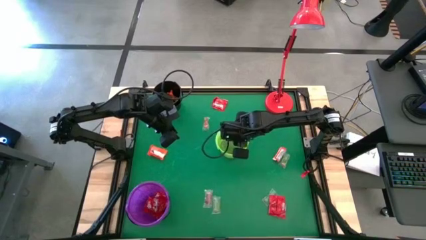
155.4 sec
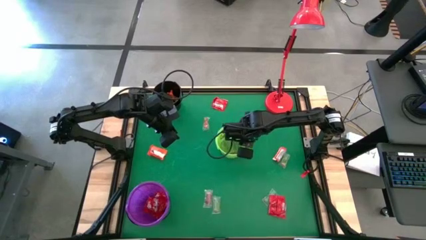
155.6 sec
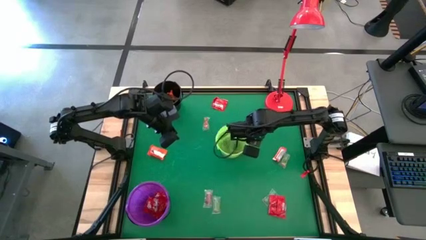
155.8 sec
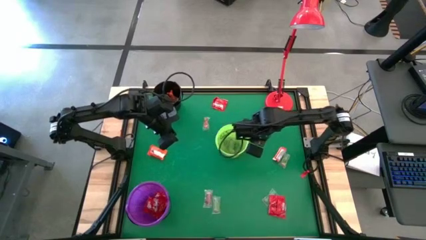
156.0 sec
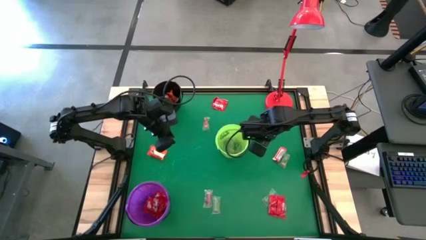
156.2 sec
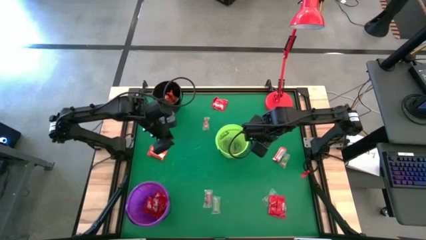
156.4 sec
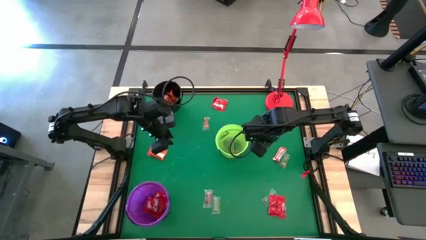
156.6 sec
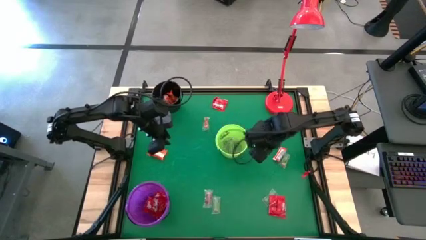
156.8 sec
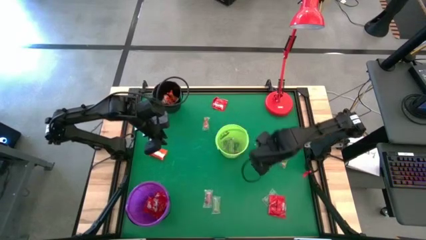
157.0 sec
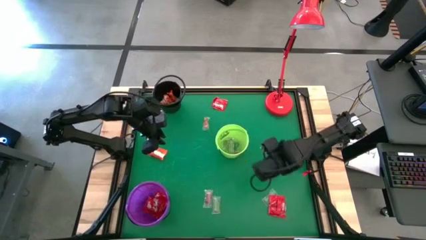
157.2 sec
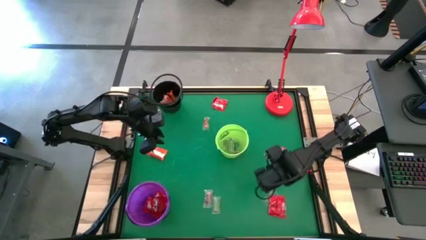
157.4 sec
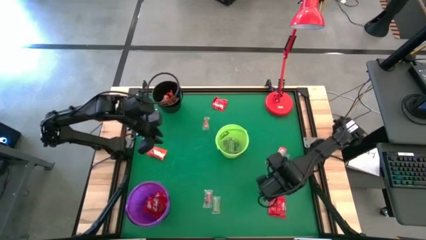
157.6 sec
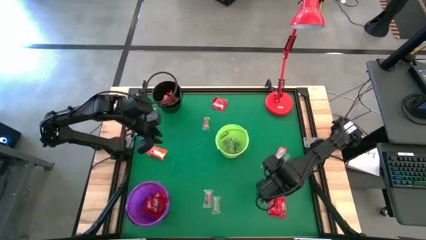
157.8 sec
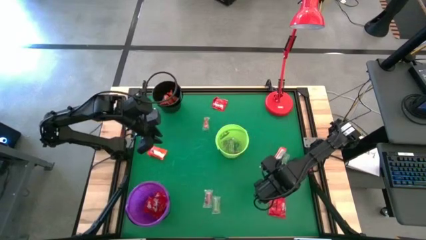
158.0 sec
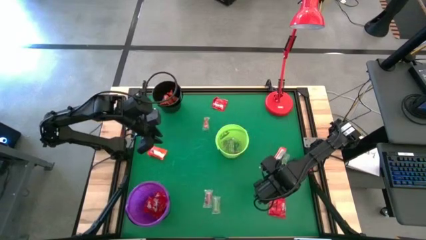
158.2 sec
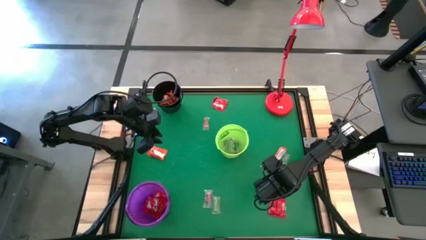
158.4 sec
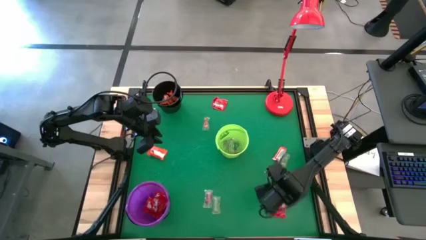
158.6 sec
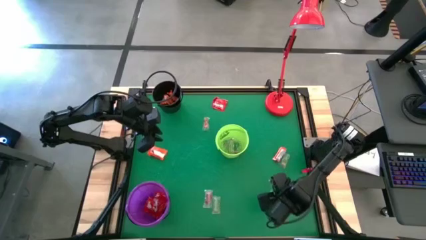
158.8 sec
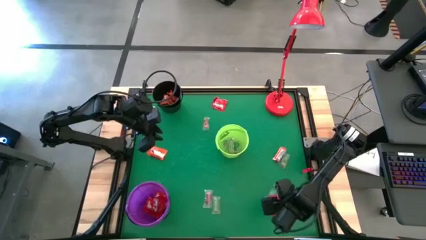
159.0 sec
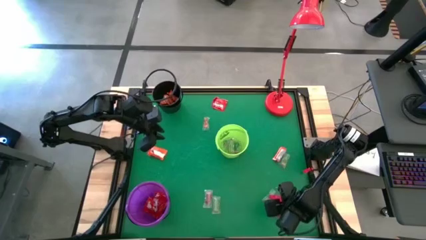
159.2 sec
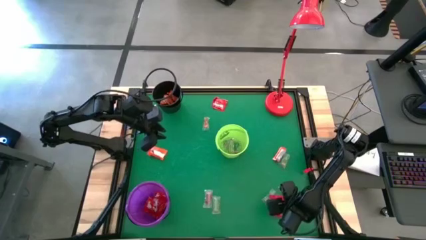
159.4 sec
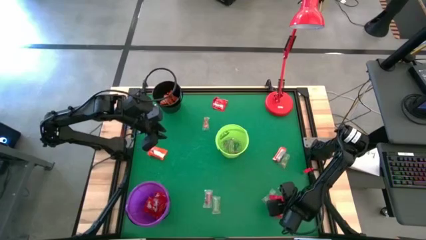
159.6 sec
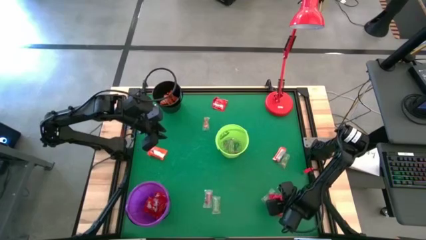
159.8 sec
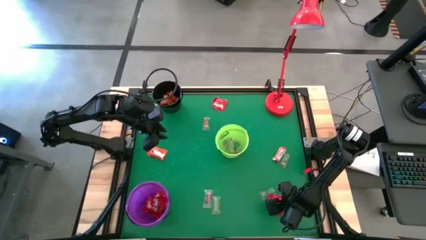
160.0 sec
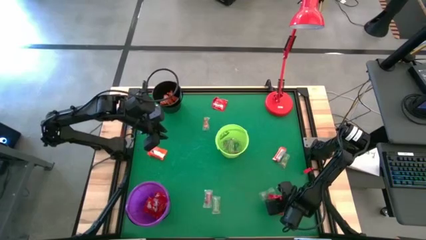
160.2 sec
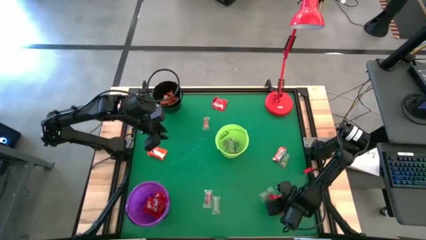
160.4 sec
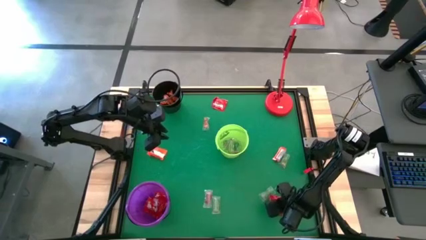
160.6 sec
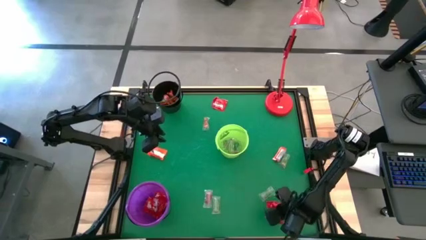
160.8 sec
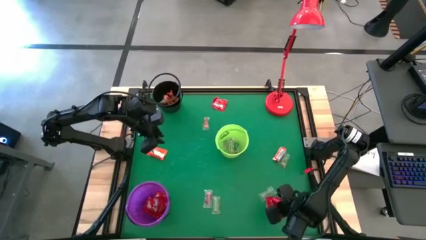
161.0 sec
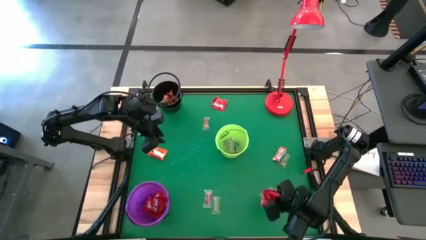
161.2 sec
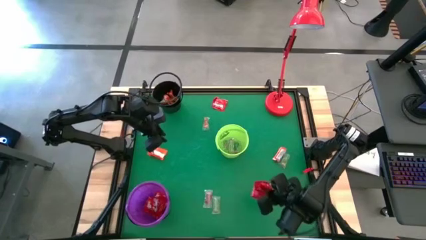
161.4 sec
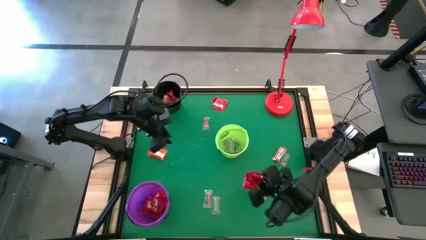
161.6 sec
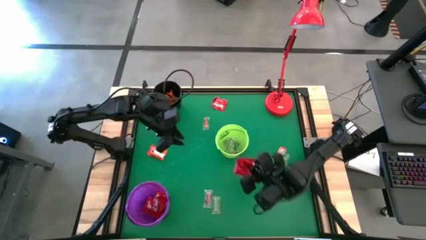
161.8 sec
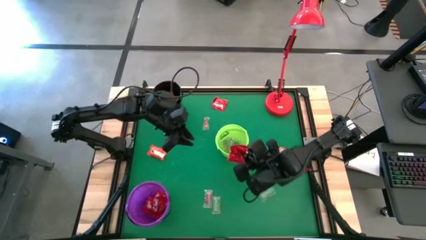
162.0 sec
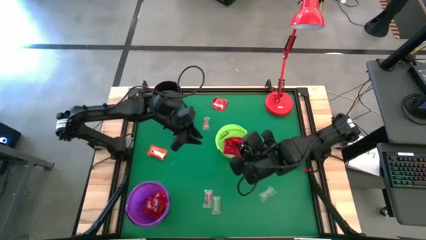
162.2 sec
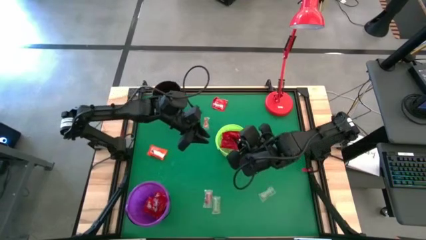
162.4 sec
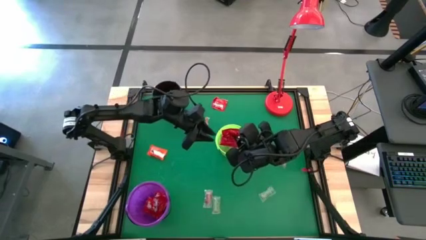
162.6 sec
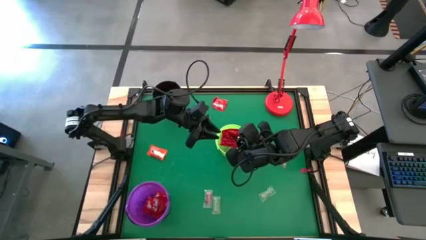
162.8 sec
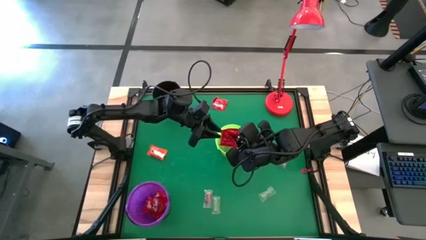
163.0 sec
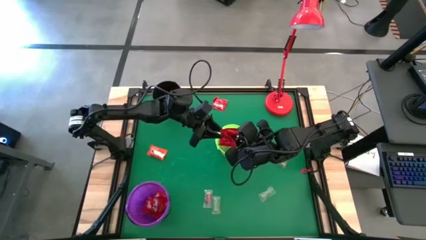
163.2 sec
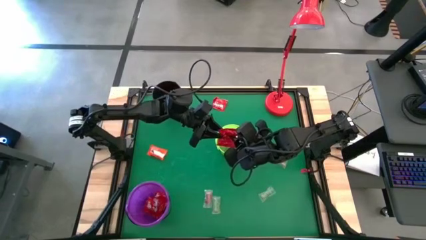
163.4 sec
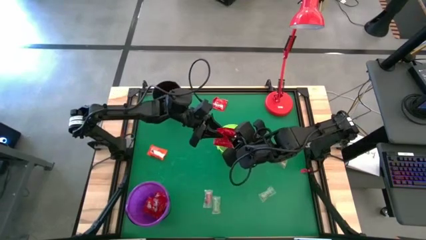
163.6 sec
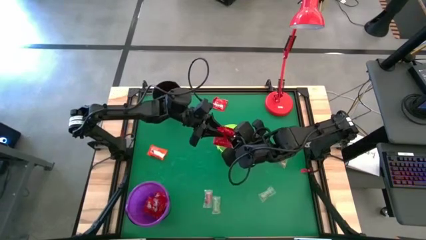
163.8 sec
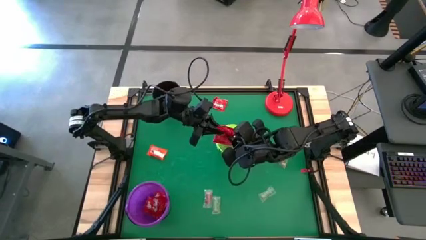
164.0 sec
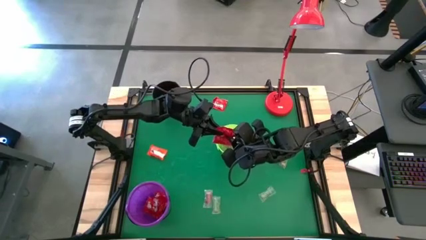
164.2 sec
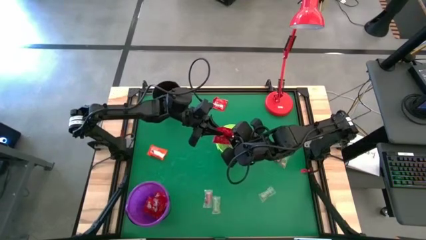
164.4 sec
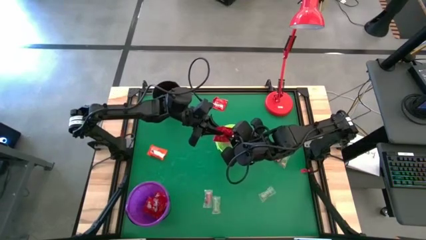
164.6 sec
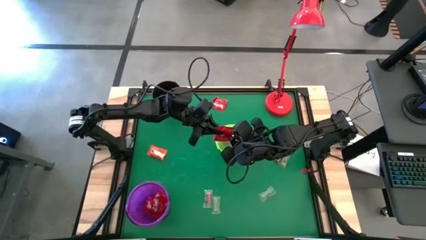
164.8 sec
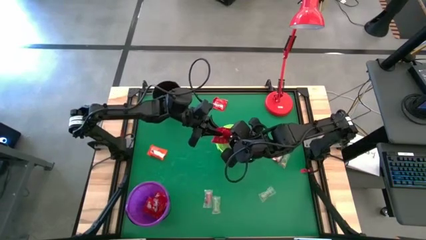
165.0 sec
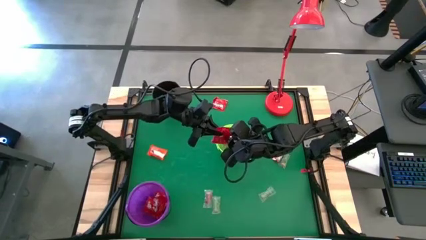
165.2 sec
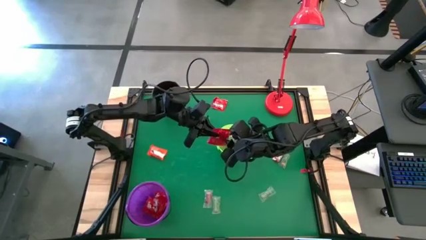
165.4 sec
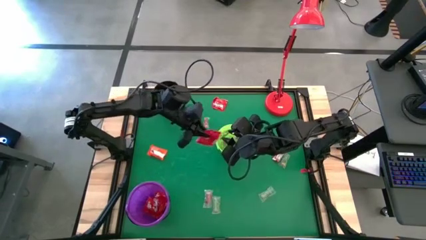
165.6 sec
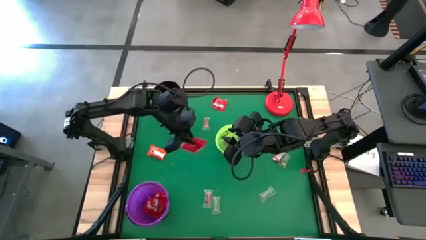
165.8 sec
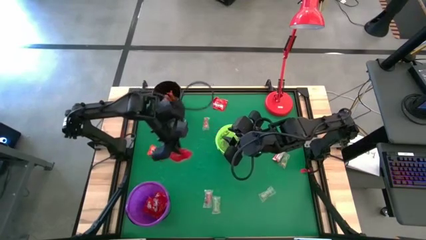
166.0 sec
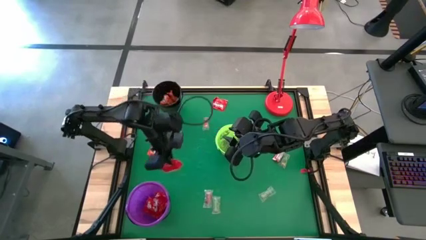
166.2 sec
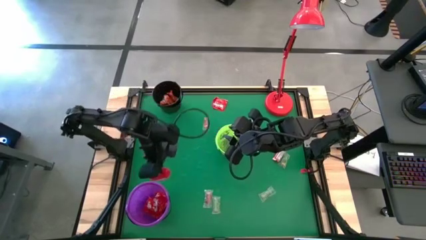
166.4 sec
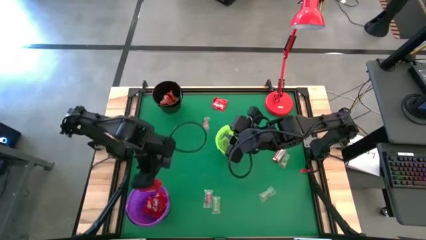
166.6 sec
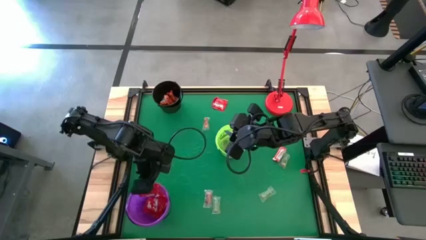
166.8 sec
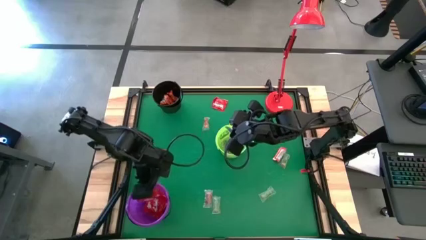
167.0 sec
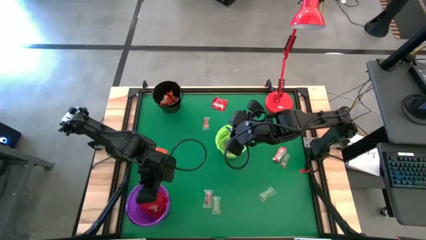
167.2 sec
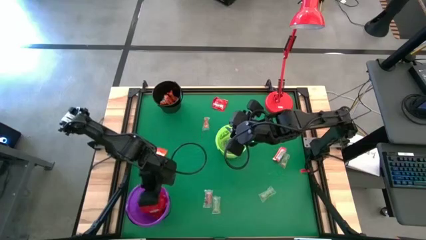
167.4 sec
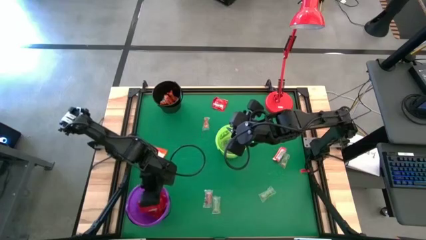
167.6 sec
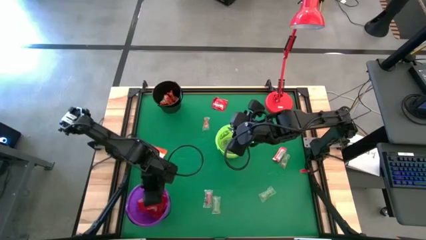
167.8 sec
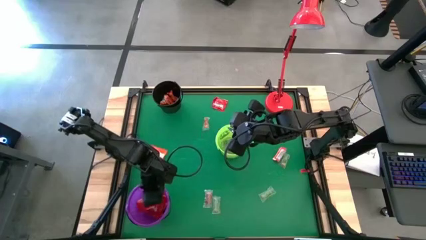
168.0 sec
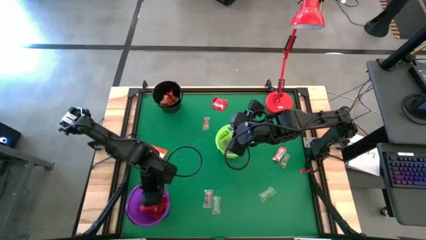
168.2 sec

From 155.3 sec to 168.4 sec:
Task: Sort candy
Put the red candy into the violet bucket

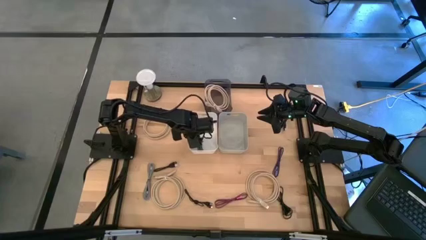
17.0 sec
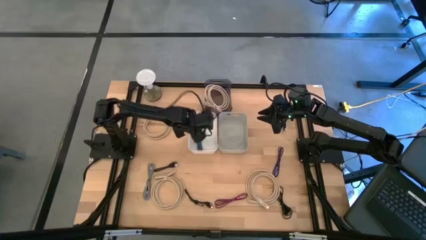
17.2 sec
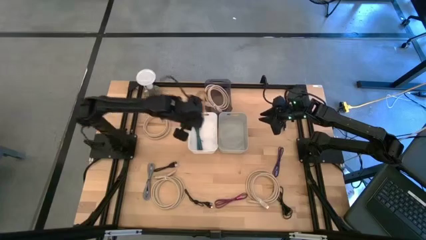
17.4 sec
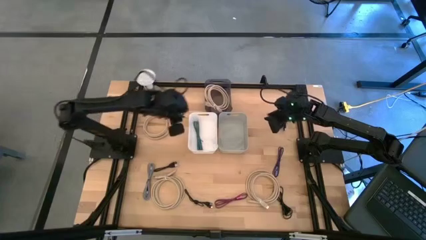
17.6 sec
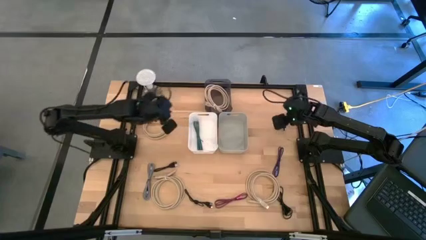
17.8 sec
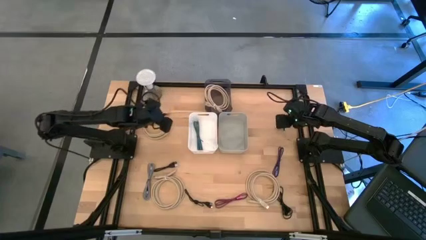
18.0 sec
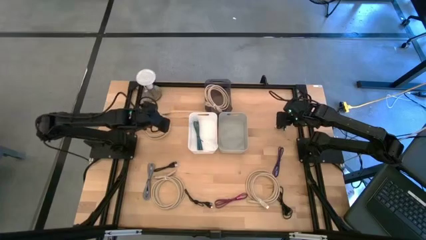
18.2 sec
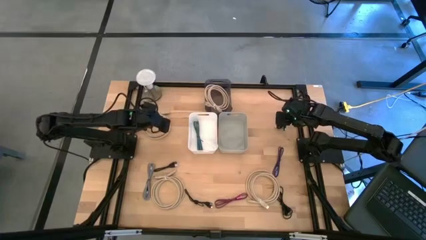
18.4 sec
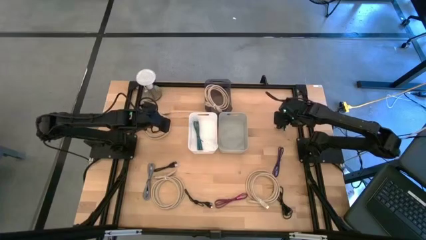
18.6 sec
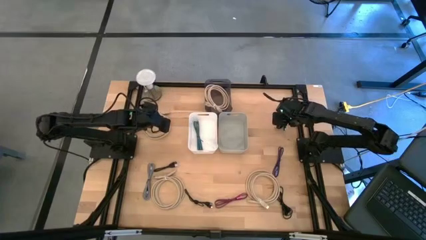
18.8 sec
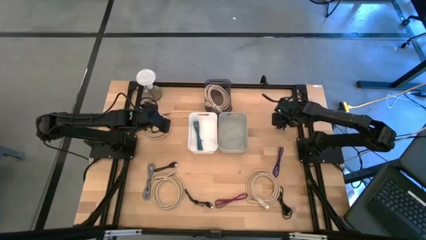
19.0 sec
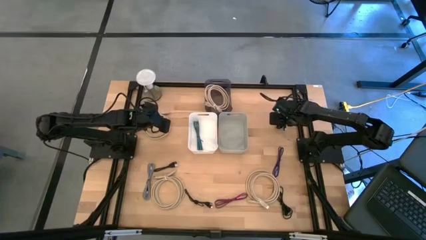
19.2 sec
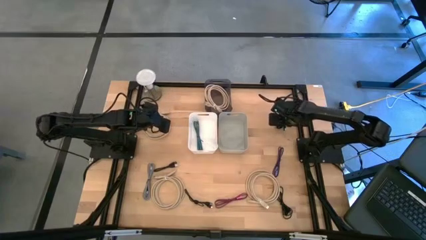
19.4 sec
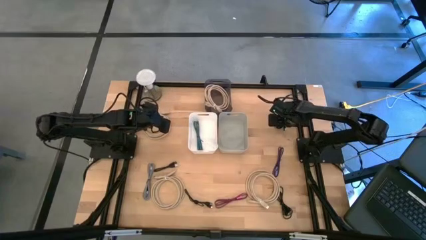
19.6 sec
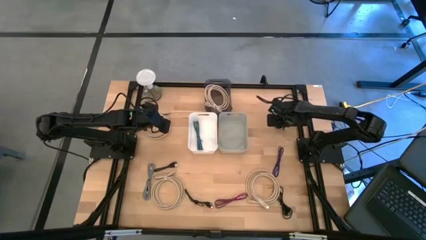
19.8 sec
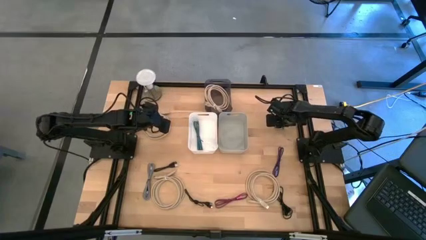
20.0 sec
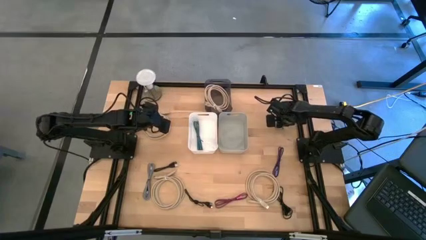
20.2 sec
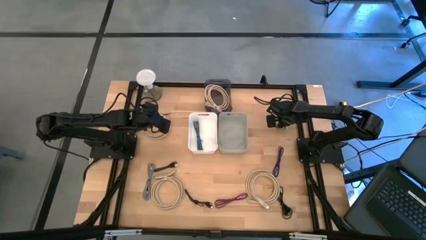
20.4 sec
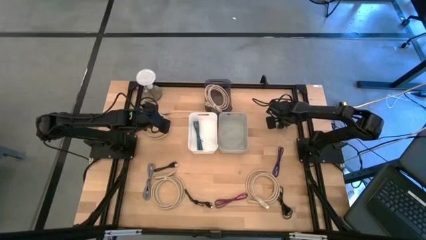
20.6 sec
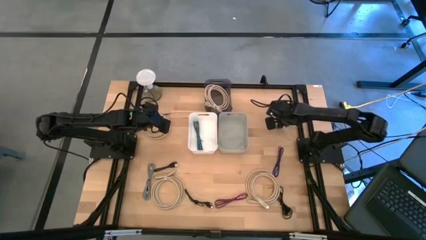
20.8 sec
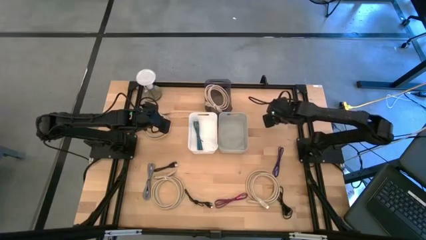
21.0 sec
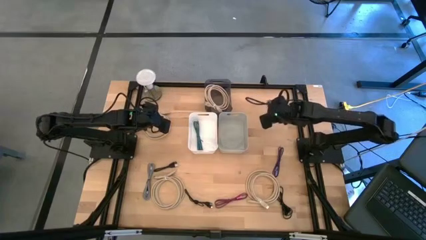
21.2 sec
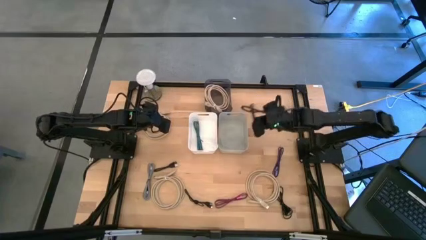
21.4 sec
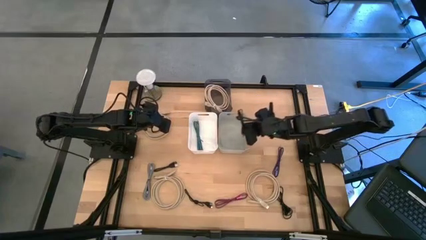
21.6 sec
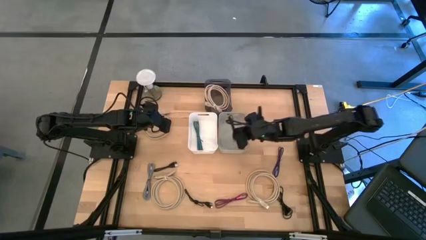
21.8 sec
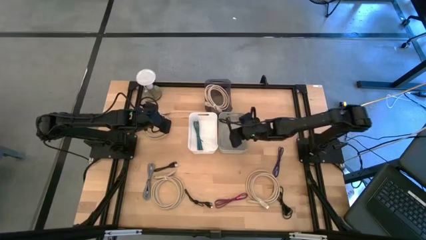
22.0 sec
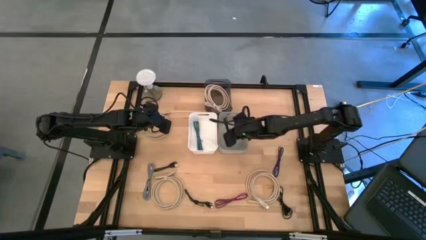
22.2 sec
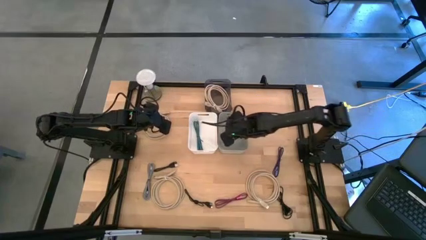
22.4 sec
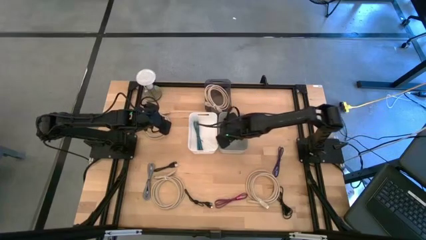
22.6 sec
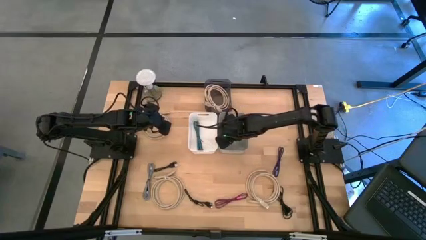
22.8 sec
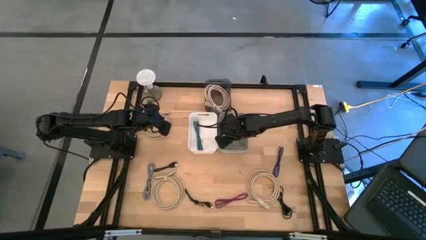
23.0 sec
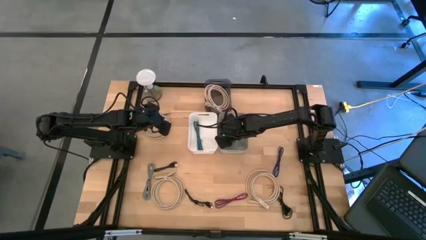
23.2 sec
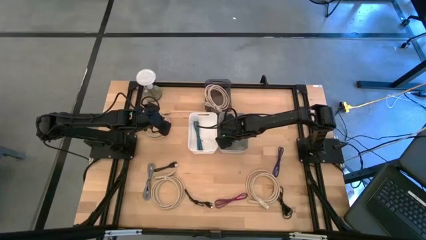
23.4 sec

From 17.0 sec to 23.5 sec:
Task: Pick & Place USB Port
Put the black charger cable into the gray bin
